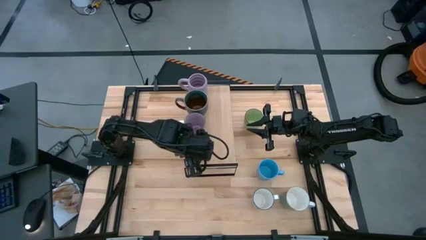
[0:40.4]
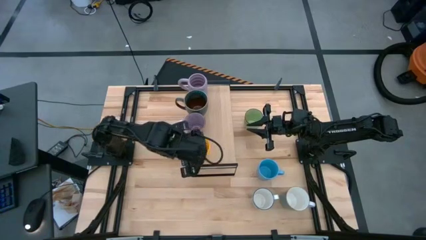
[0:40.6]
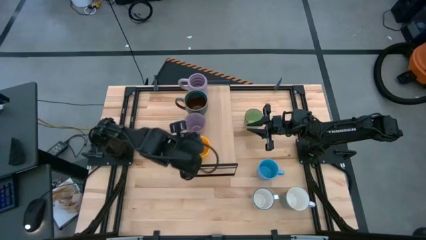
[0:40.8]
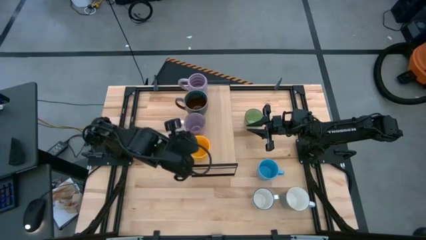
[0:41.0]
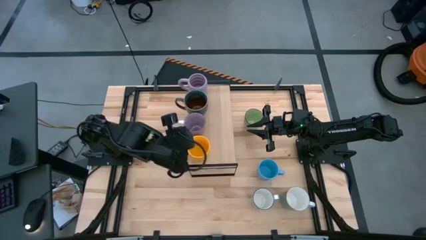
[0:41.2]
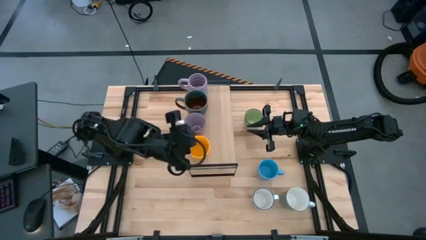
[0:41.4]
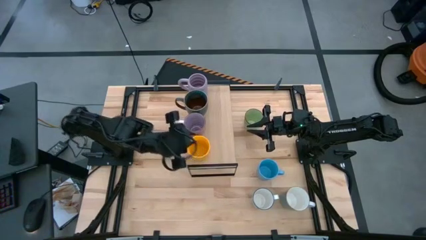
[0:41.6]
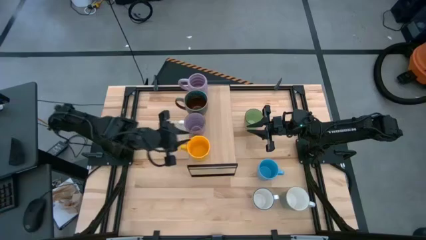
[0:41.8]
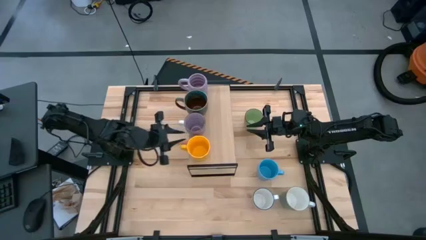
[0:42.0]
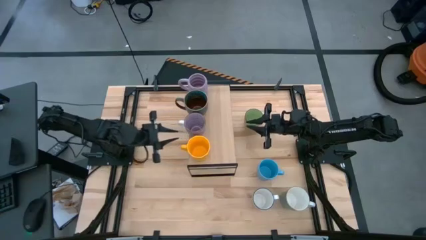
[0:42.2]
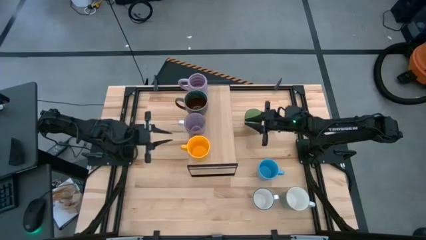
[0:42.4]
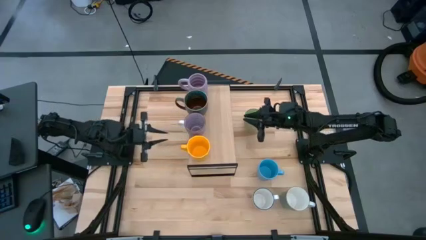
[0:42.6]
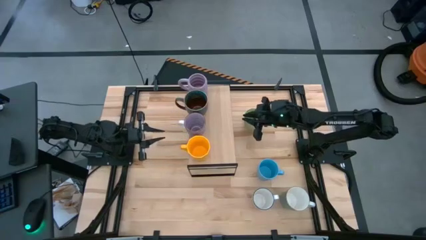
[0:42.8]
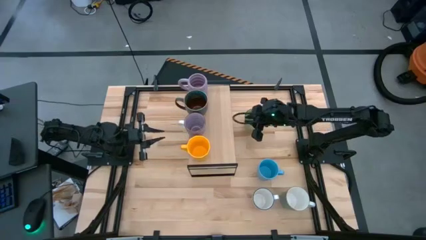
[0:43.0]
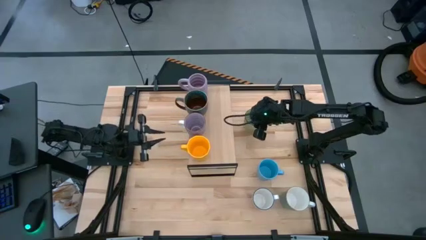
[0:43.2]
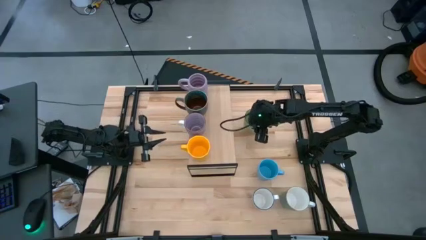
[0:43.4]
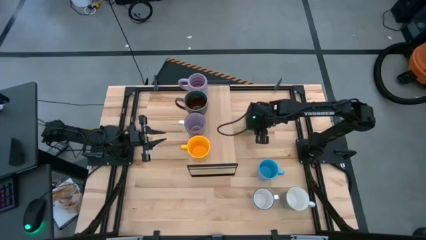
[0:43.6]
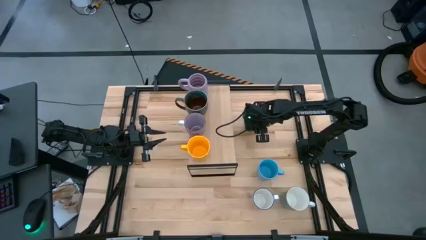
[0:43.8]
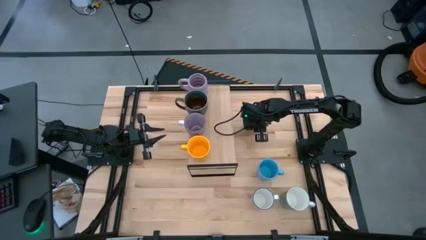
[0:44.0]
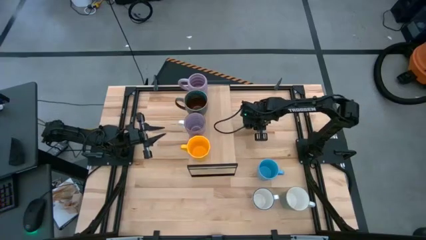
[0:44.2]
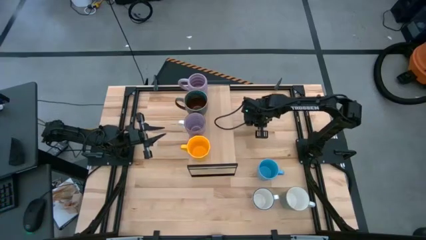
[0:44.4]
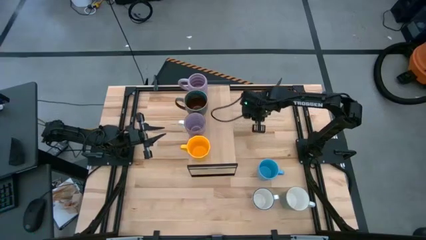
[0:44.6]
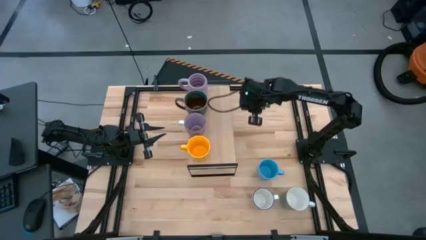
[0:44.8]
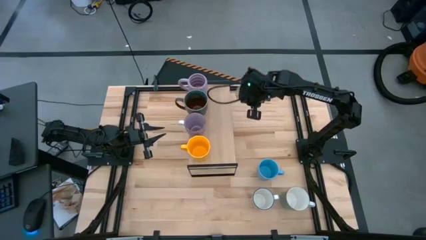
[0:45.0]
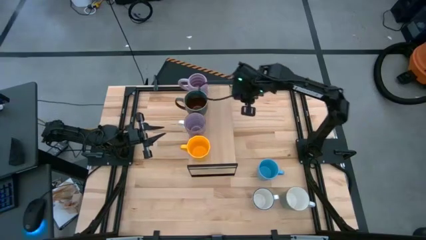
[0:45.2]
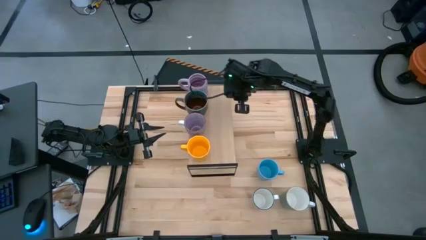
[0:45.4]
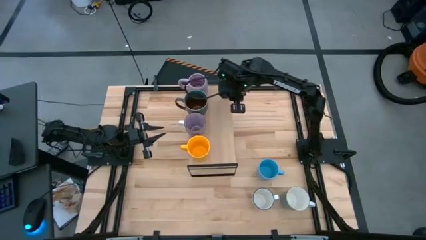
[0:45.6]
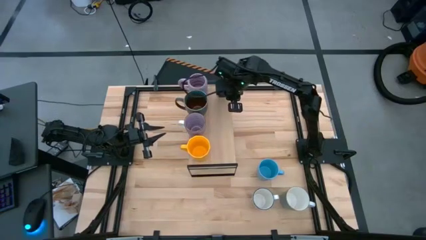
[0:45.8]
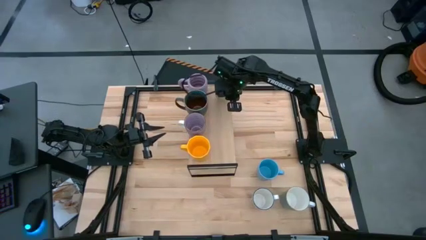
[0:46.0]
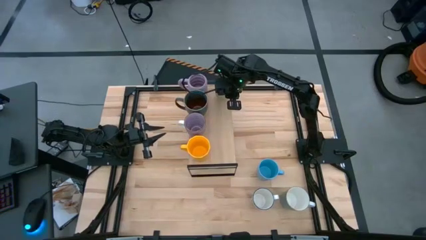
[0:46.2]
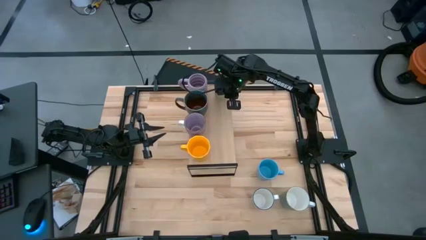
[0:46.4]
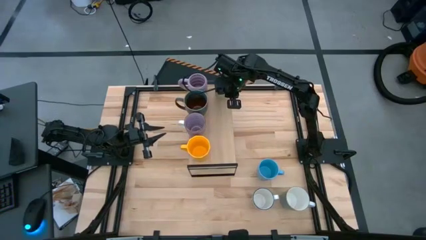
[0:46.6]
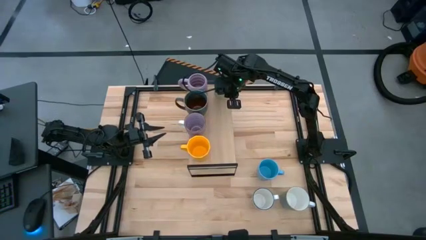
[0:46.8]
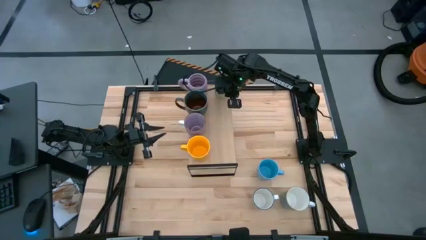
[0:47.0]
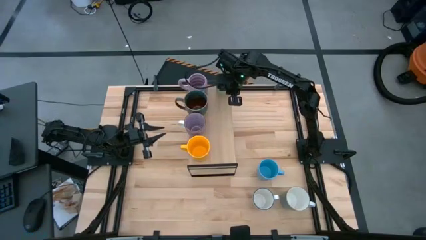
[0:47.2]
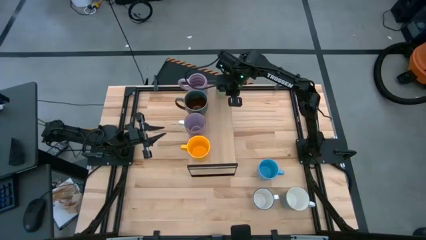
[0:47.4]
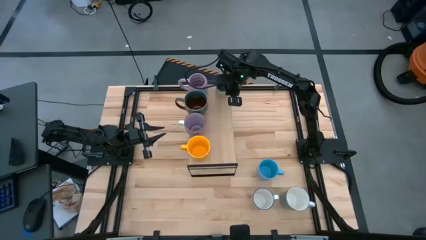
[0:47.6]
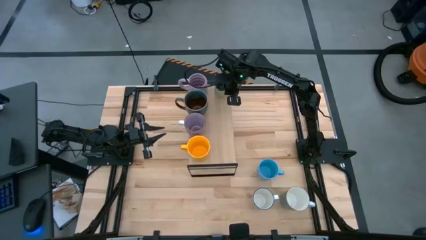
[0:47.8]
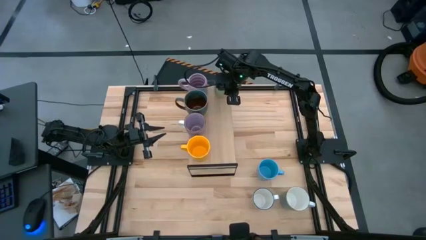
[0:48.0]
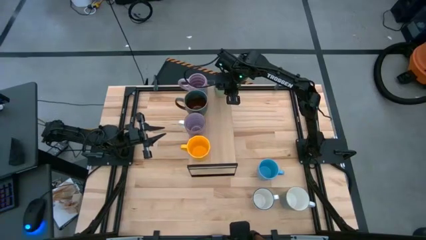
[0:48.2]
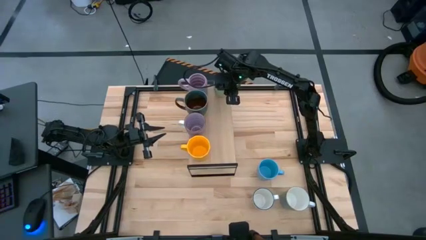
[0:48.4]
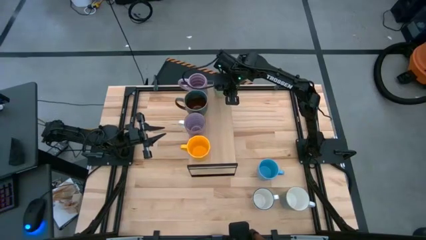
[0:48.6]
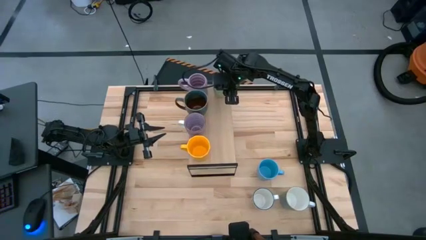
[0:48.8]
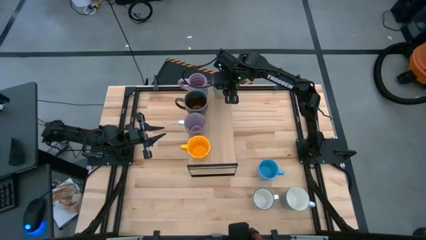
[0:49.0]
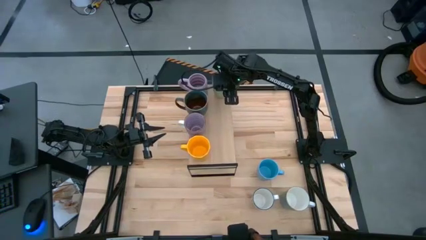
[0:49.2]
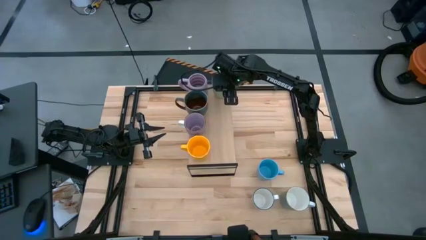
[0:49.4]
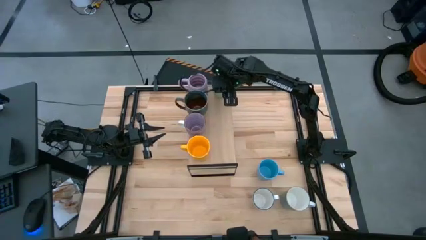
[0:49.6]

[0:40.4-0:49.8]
Task: Place coffee mugs
Put the green mug on the shelf

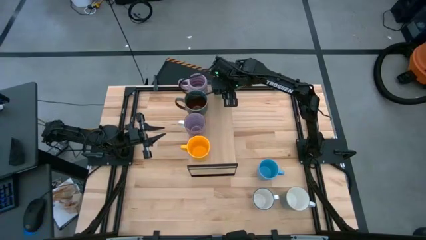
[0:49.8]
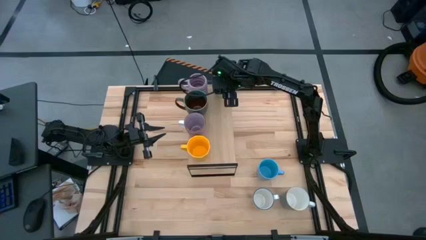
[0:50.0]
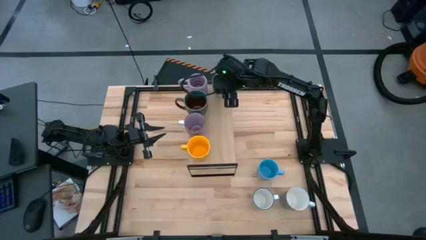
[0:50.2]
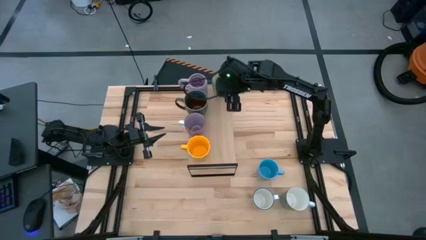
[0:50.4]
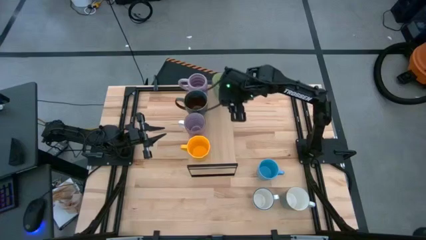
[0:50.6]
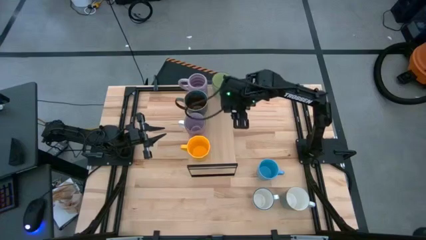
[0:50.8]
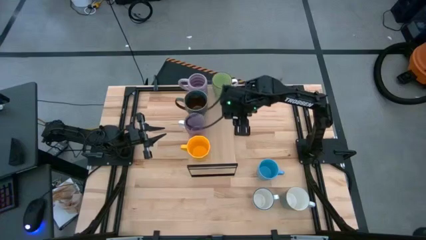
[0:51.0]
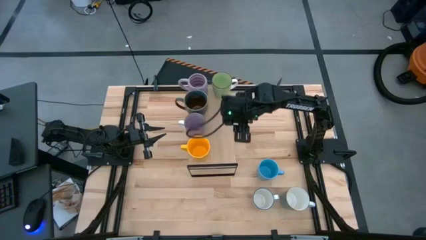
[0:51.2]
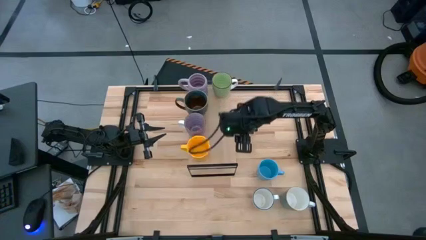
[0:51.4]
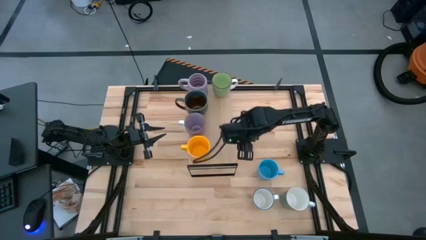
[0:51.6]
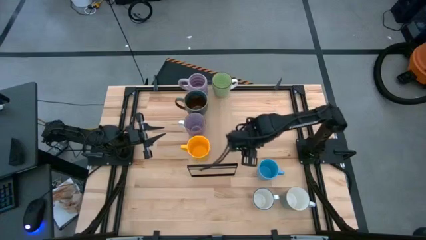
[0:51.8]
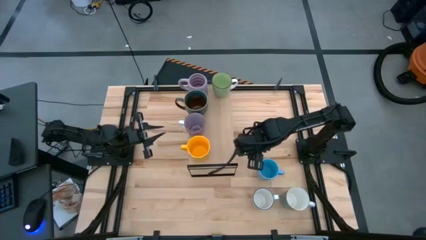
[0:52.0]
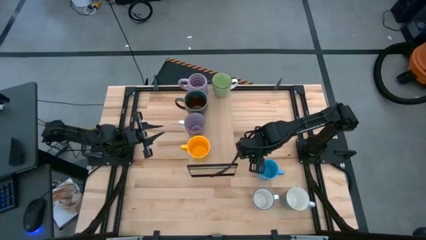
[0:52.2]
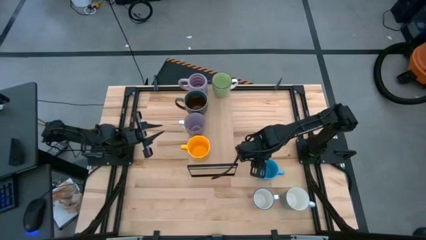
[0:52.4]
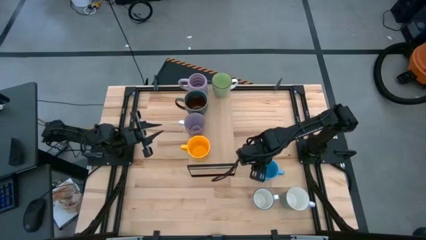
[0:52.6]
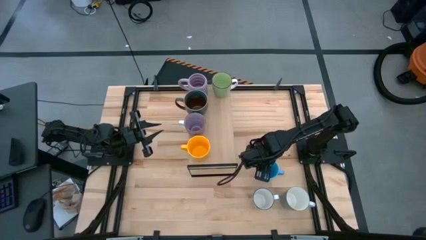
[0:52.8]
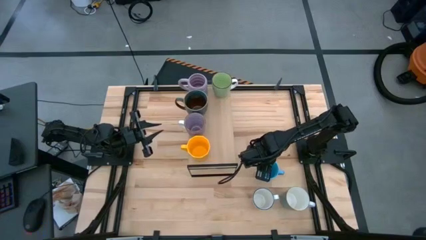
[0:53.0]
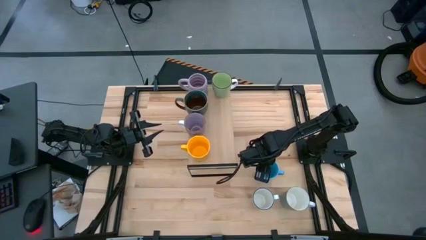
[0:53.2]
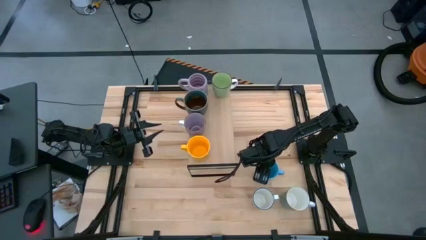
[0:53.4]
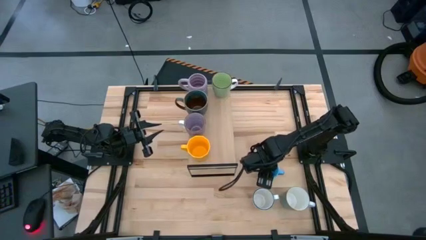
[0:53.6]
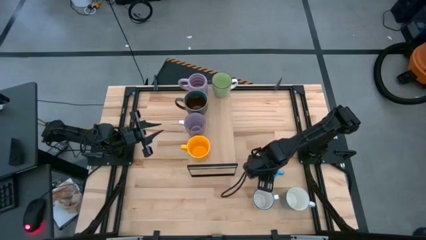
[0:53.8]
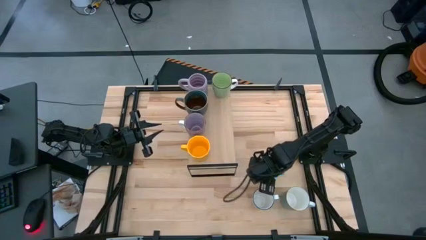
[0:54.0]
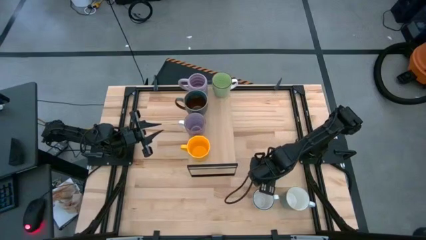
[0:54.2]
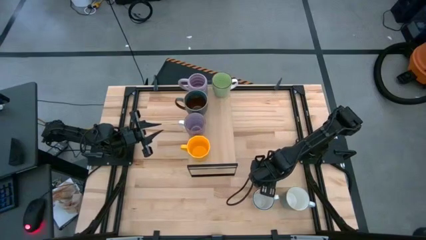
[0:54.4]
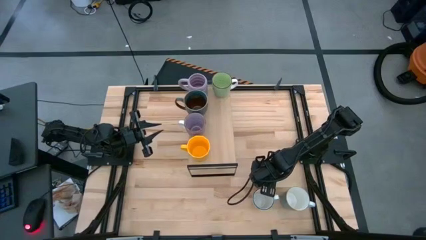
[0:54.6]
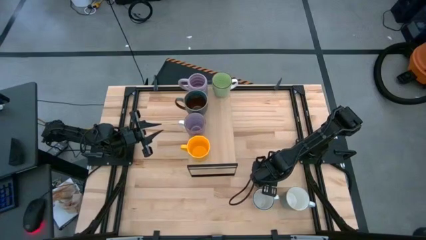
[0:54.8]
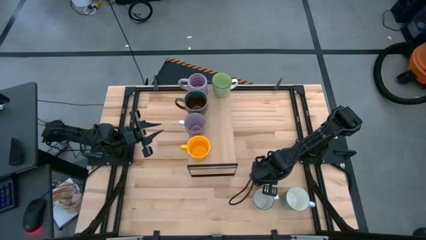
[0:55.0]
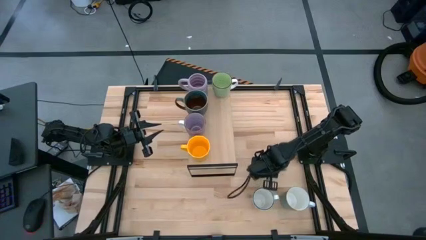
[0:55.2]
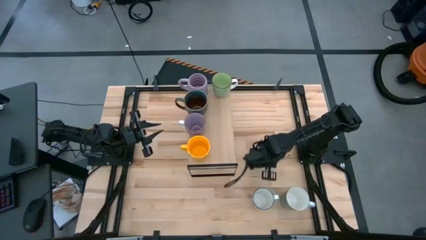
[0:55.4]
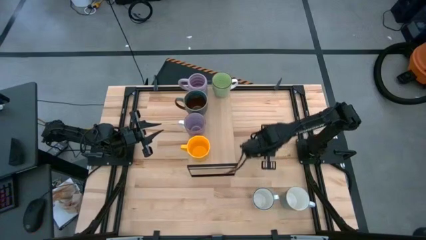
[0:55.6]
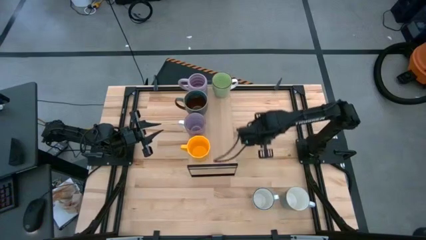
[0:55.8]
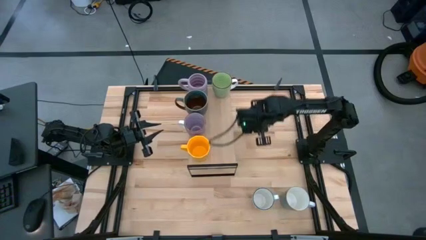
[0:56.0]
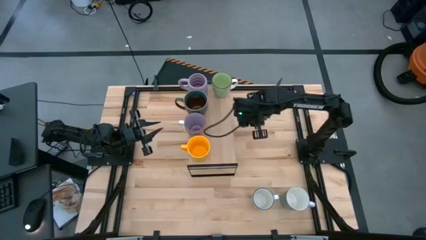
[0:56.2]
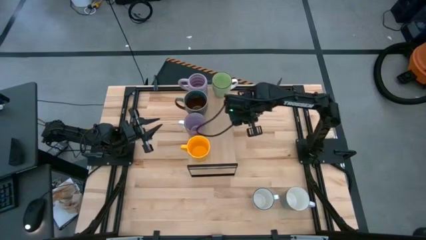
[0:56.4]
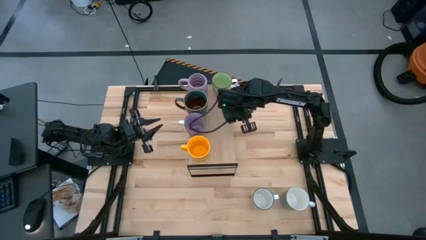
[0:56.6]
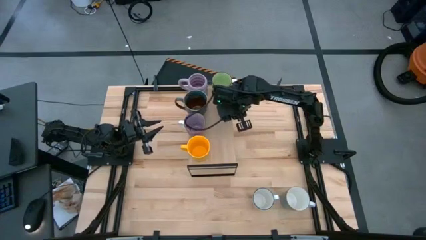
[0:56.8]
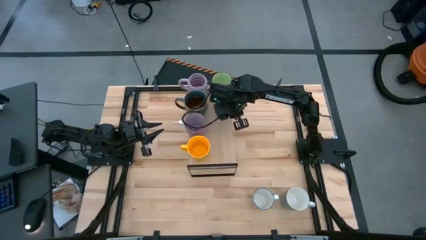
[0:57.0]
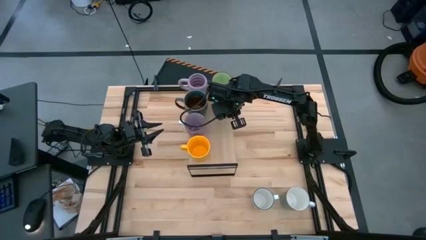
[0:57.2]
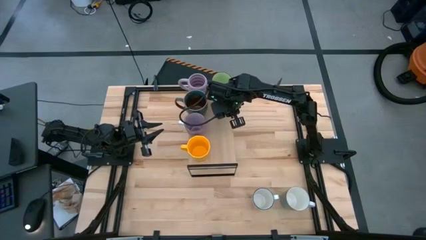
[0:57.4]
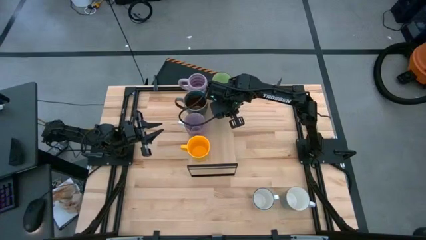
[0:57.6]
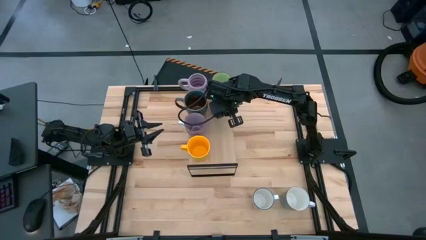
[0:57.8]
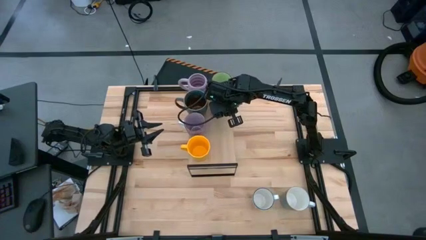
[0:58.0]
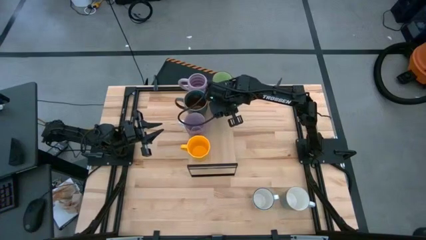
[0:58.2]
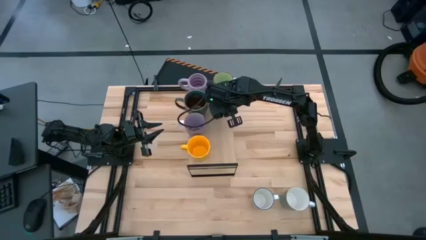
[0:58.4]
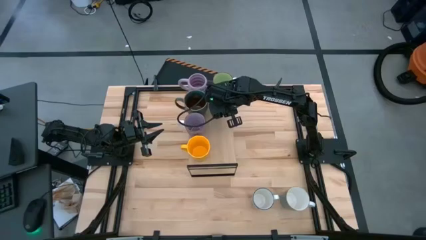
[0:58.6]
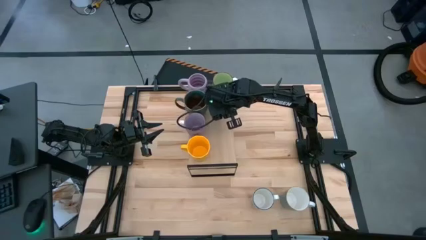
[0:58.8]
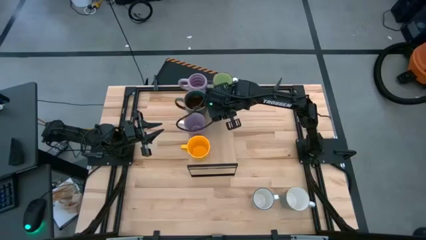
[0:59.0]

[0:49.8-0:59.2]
Put the blue mug on the shelf
